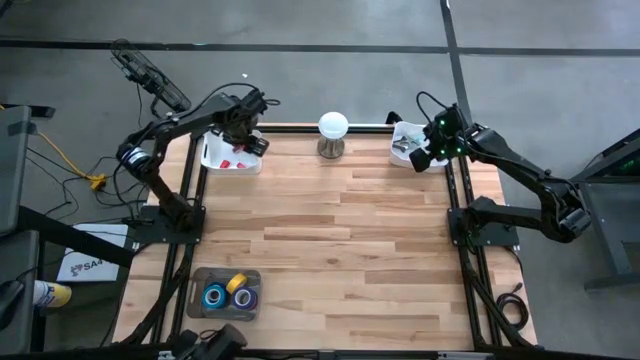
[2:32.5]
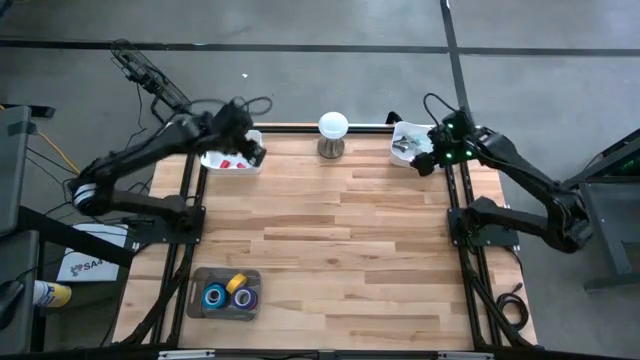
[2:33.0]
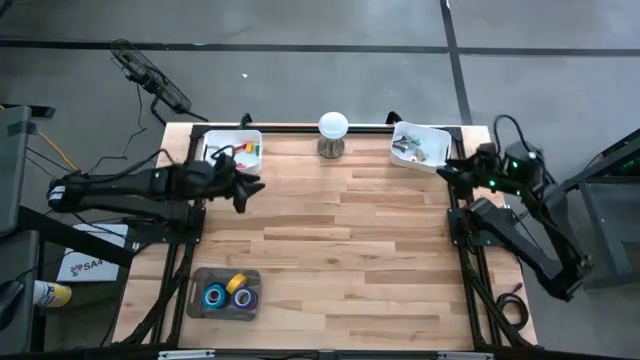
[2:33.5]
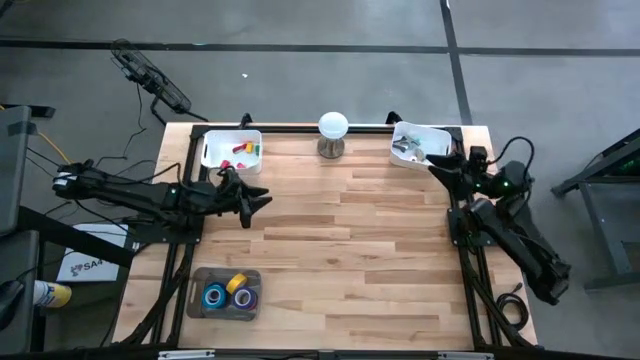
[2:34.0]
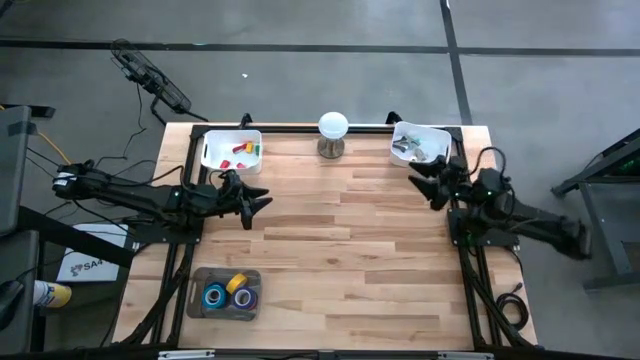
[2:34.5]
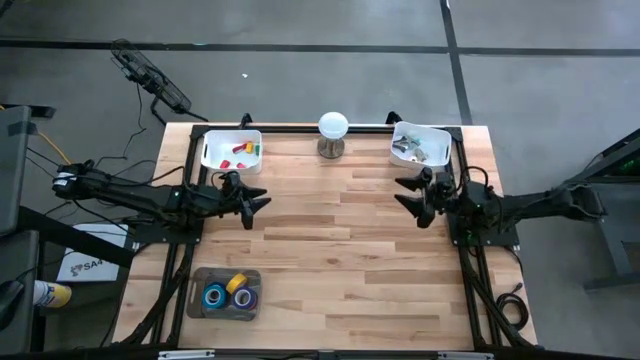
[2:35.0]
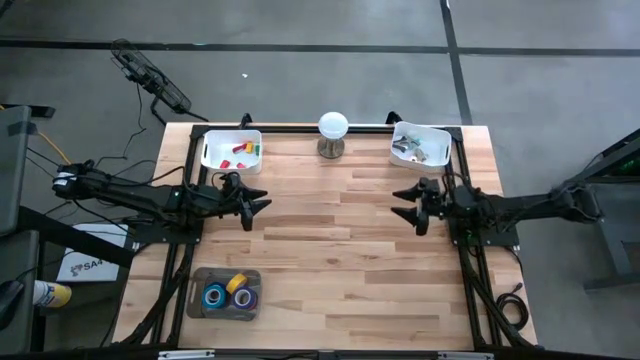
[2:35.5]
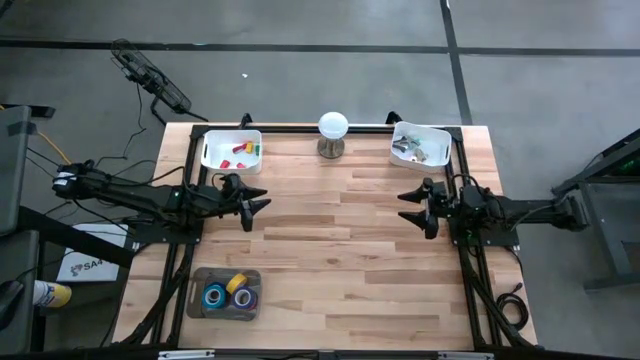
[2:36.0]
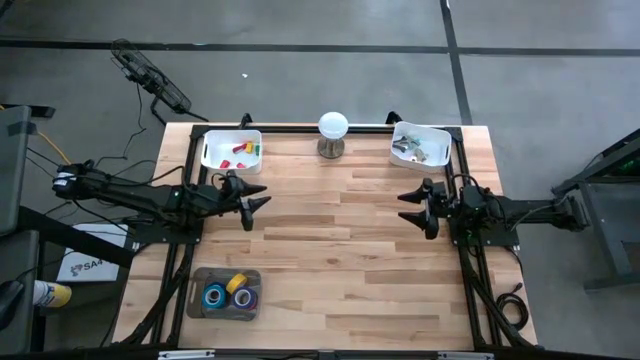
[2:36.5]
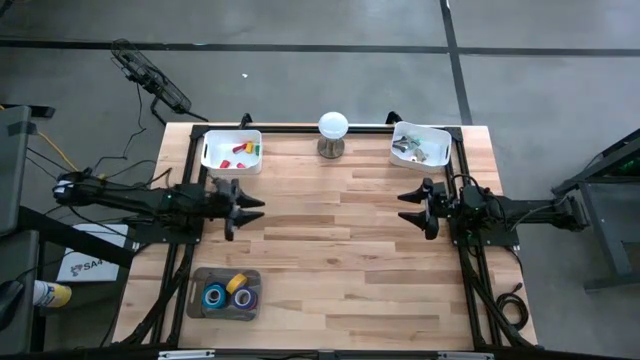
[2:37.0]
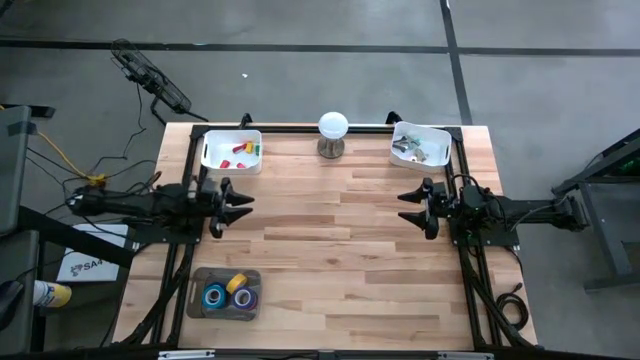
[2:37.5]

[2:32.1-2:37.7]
Task: Pick and place Stapler, Stapler remover, tape
Return to Home Position

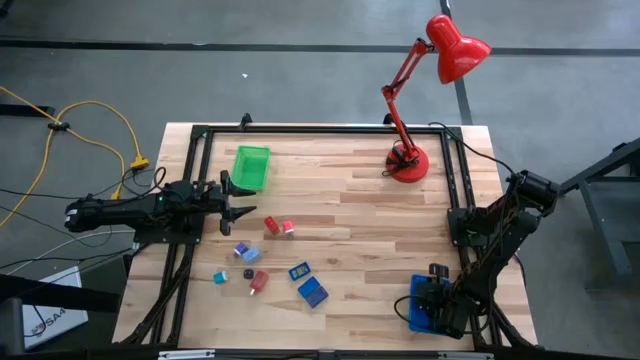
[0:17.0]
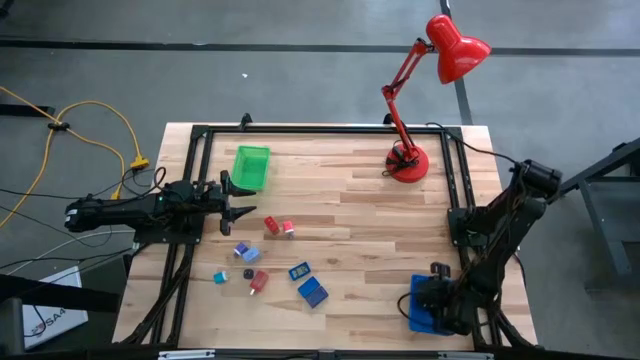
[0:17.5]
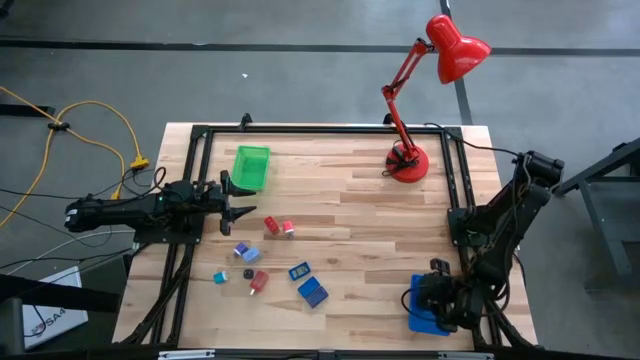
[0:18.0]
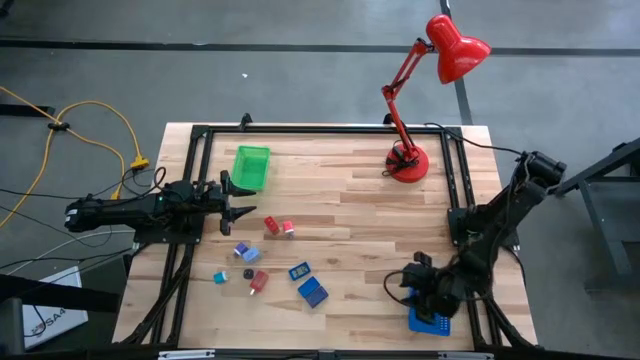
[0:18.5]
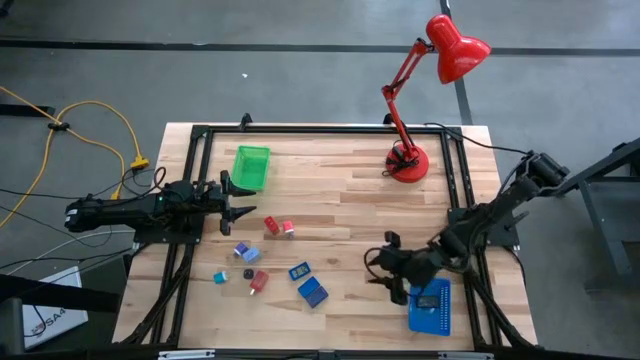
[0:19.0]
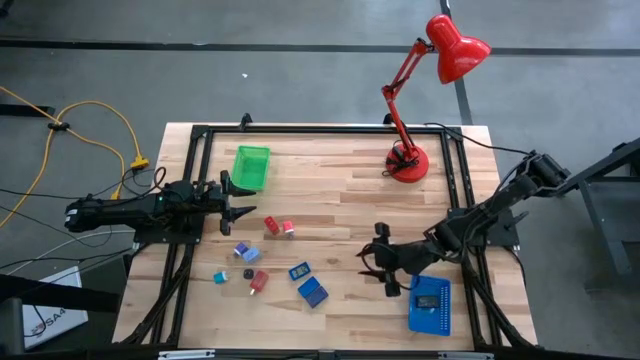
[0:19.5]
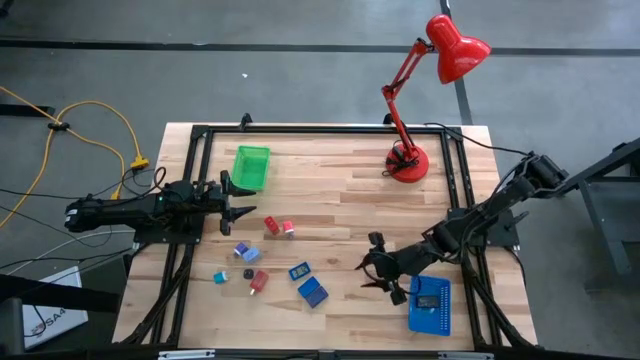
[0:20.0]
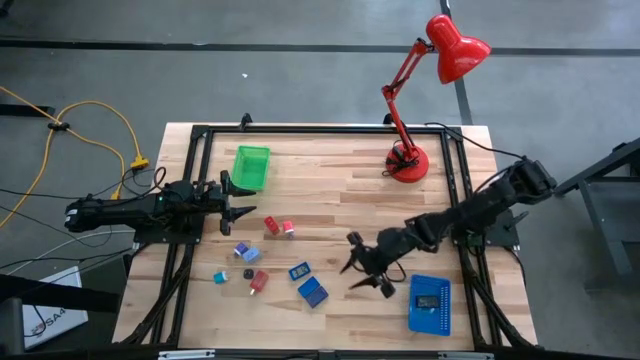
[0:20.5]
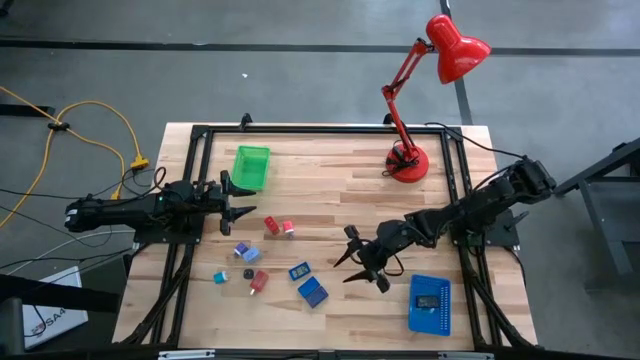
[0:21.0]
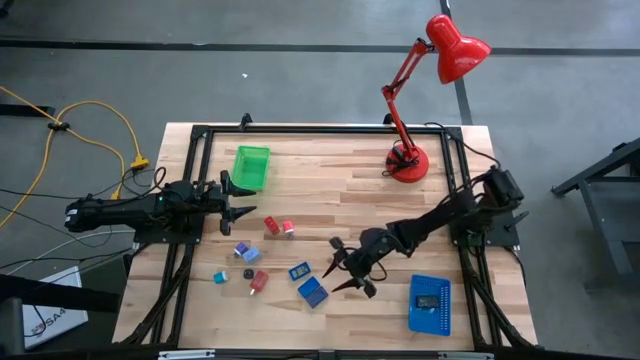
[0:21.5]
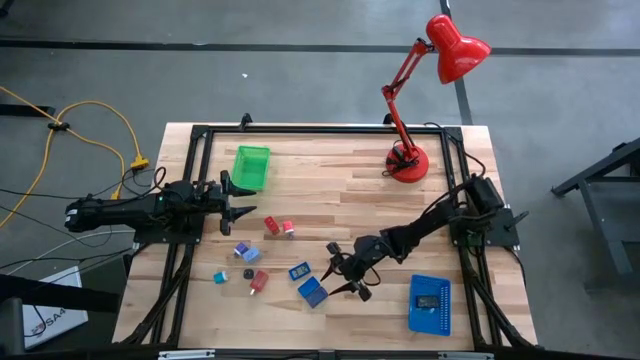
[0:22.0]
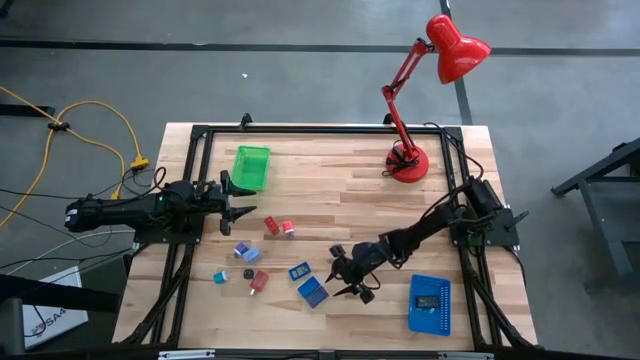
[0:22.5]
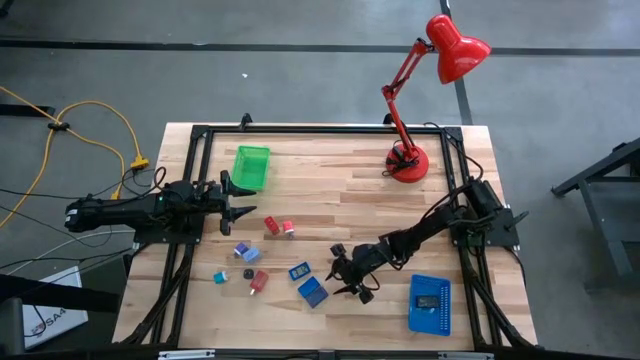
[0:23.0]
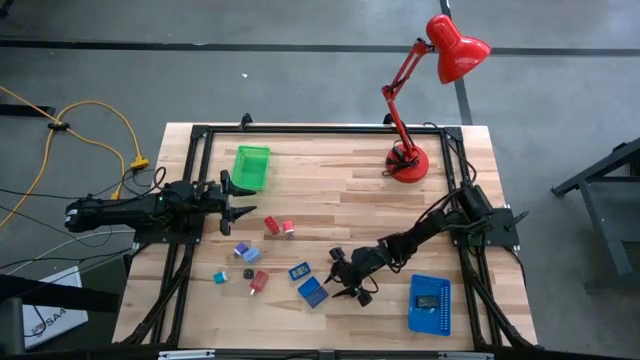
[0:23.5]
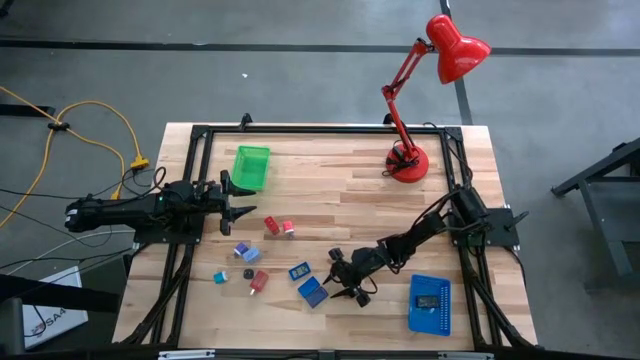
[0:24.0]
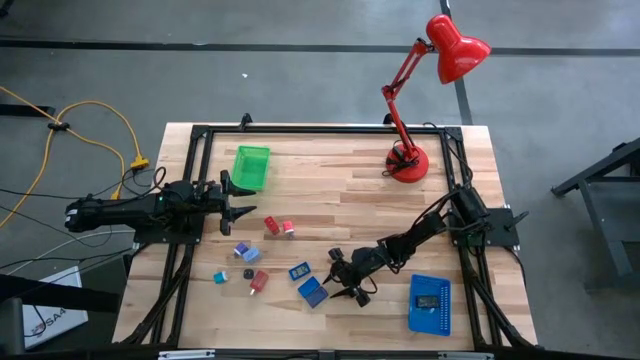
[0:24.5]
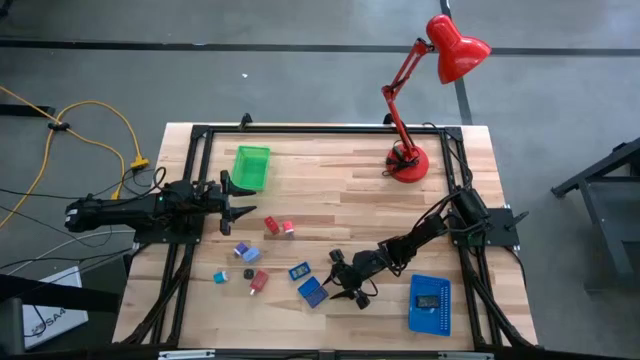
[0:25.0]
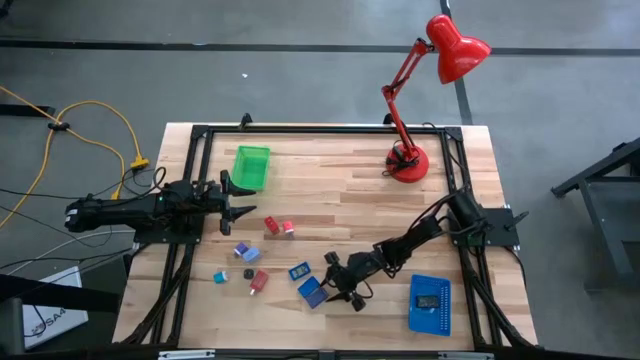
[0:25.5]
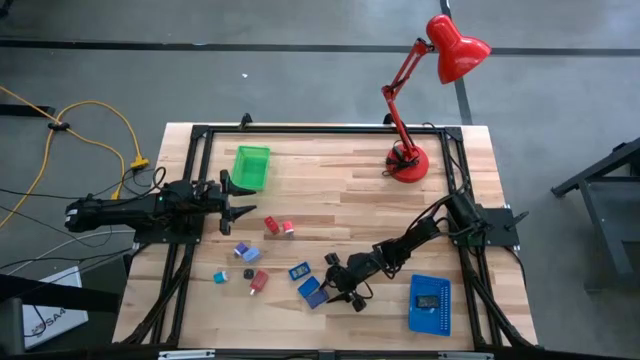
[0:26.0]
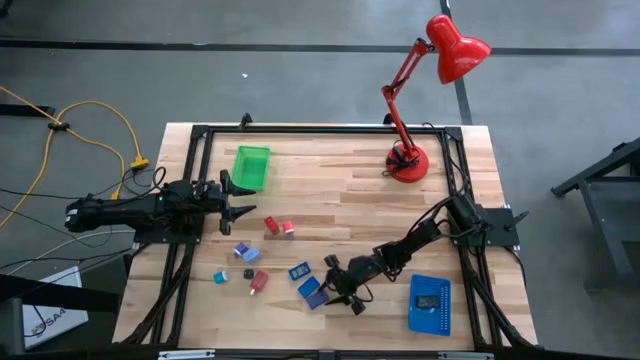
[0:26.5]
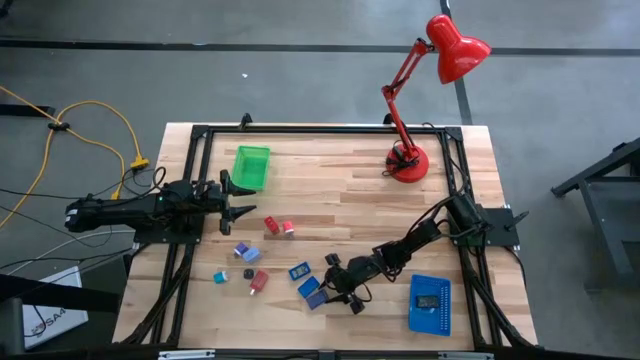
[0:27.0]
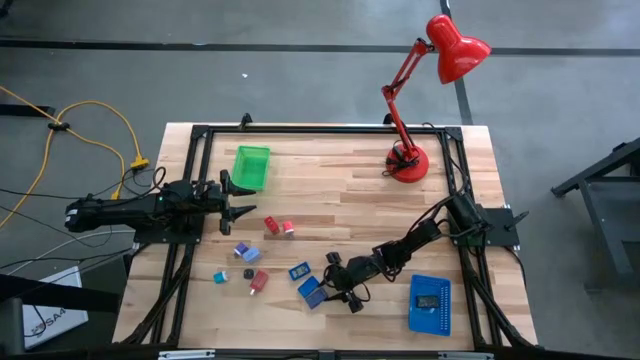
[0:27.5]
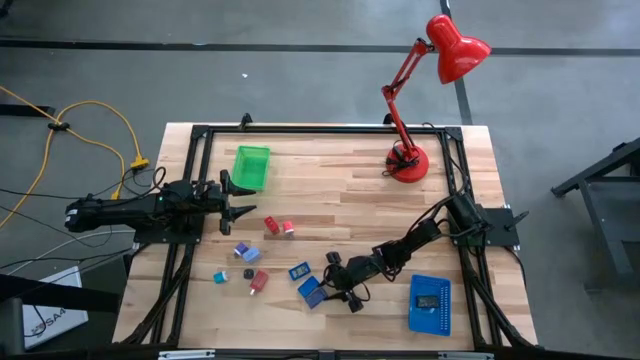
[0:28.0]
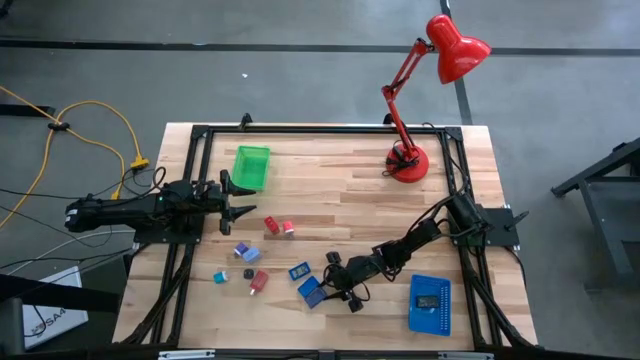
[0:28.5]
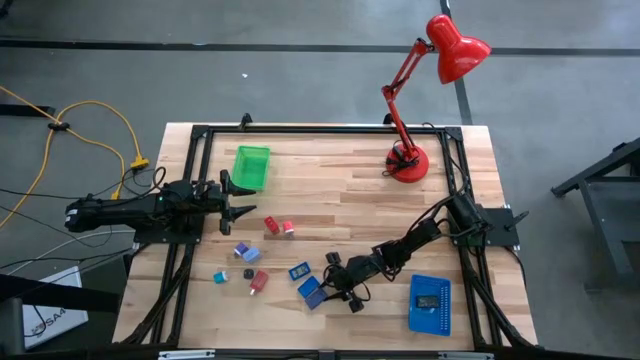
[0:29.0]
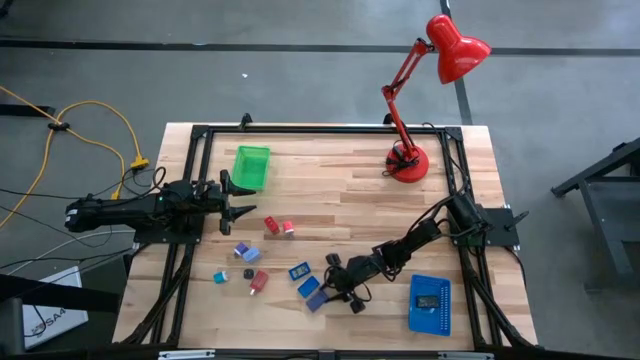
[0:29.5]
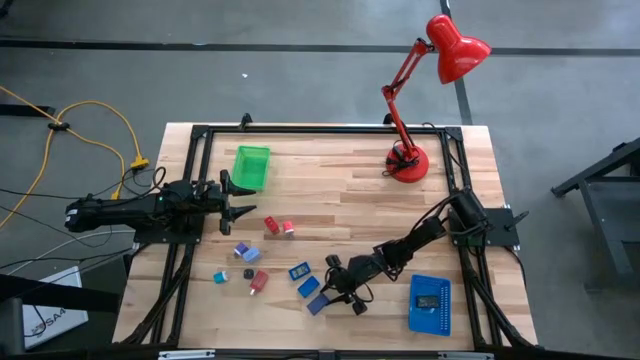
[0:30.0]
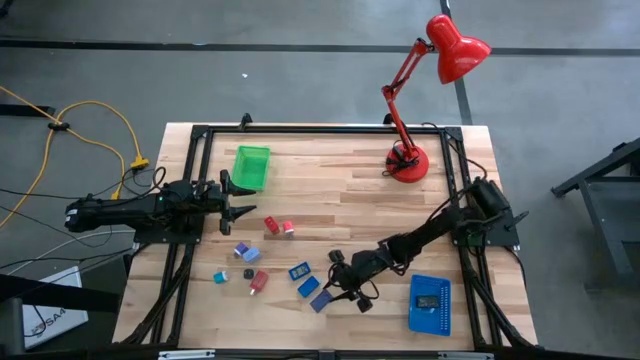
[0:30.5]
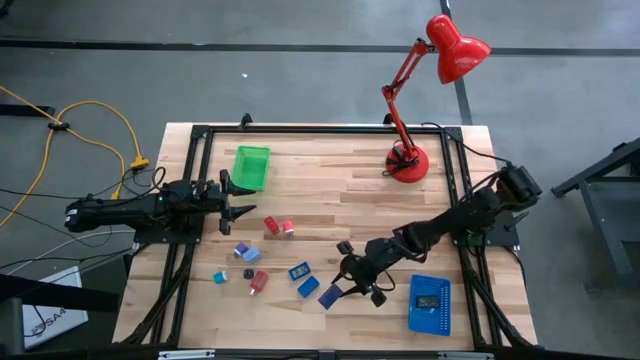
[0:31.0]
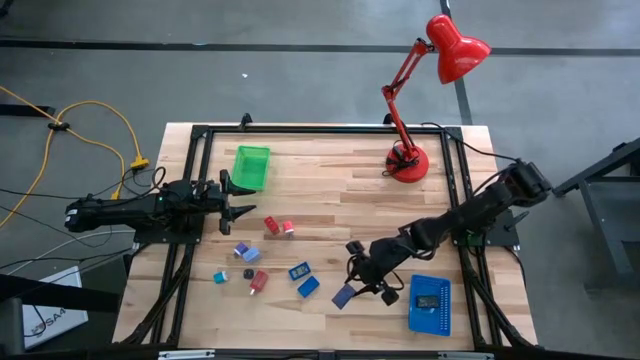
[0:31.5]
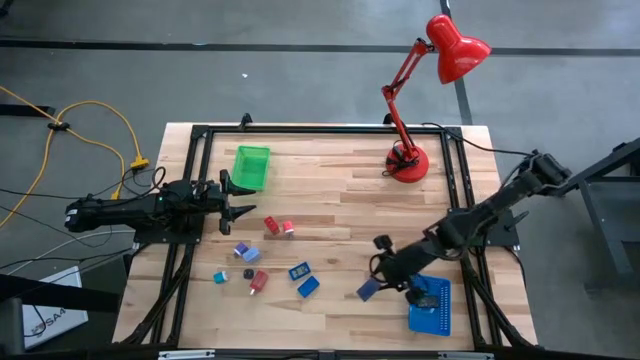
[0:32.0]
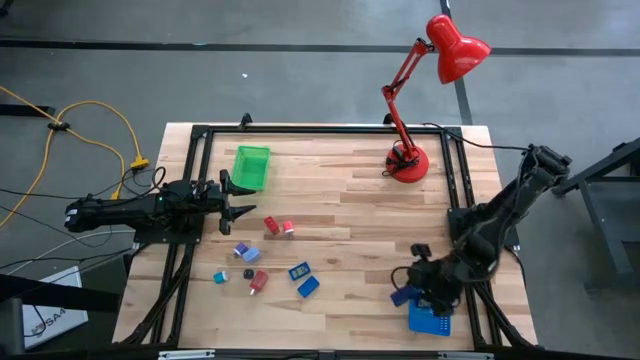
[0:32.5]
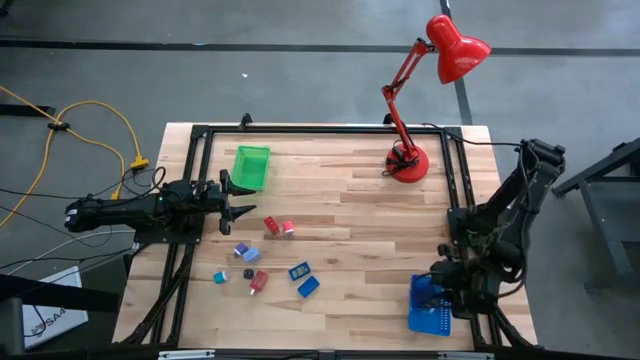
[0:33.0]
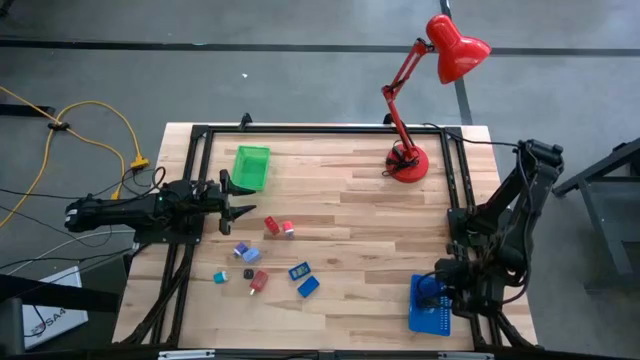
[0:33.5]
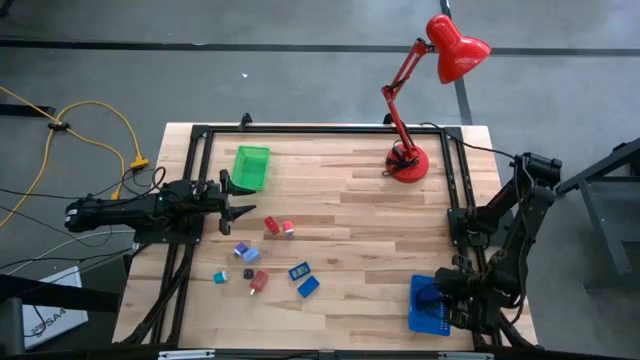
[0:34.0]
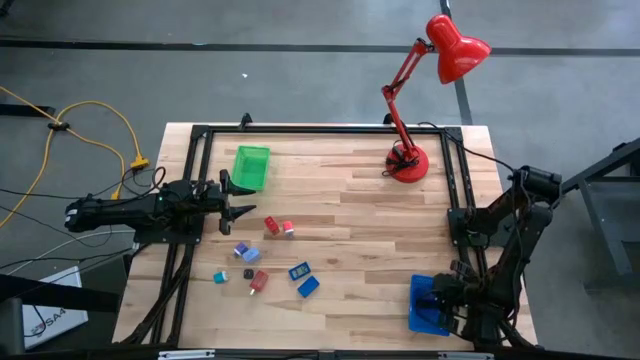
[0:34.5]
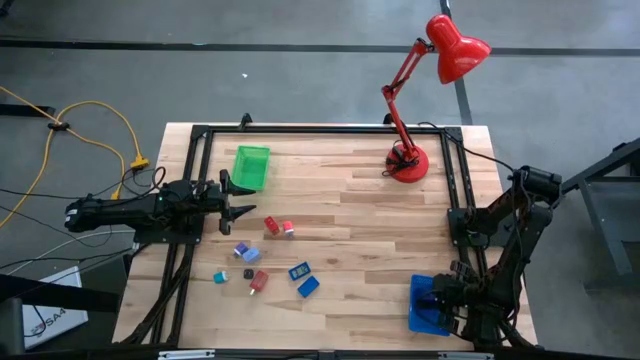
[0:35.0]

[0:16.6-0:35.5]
Task: Pick & Place Office items
Put the dark blue digital timer into the blue bin
